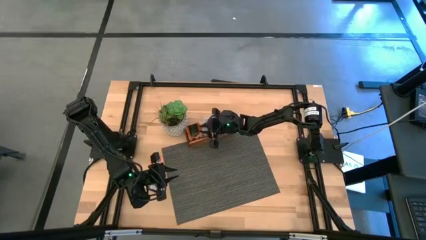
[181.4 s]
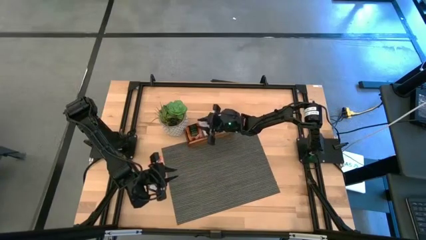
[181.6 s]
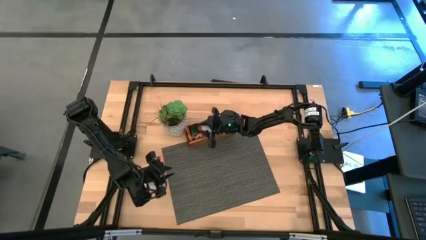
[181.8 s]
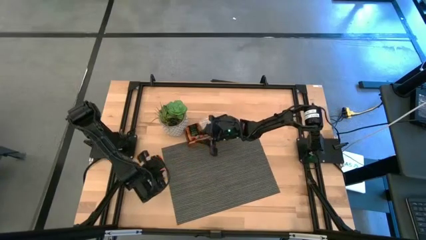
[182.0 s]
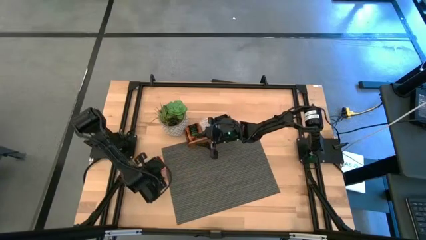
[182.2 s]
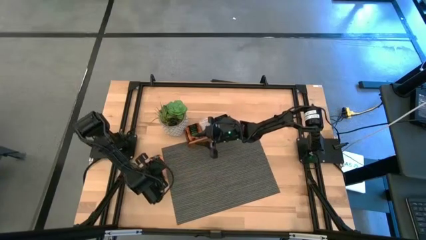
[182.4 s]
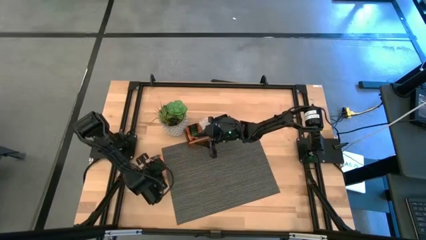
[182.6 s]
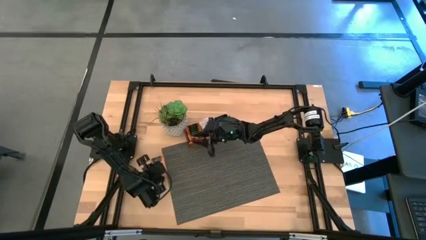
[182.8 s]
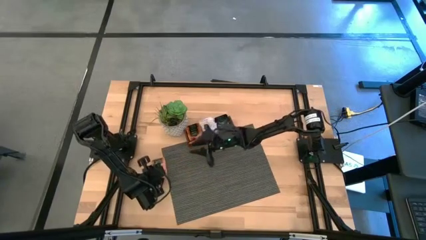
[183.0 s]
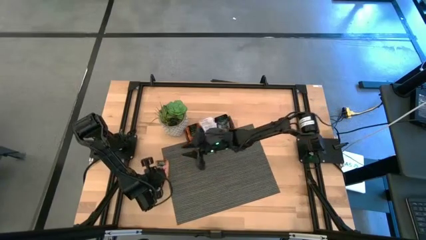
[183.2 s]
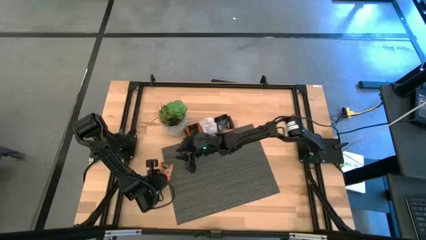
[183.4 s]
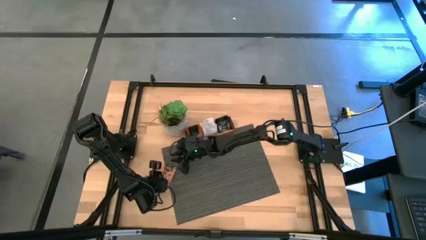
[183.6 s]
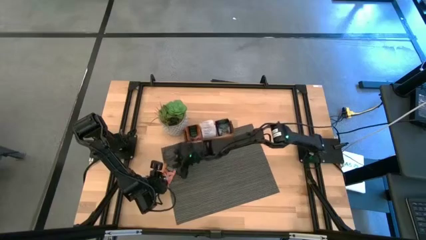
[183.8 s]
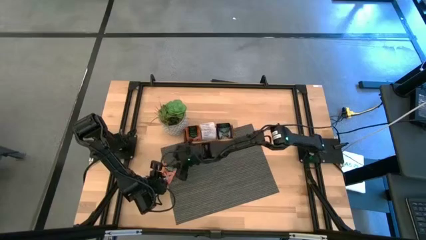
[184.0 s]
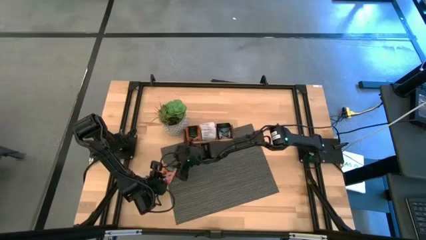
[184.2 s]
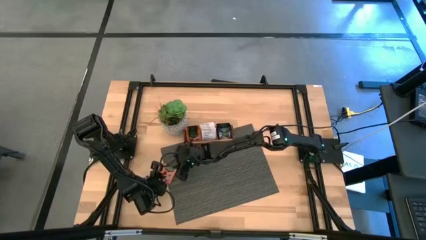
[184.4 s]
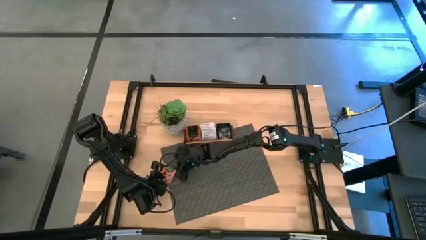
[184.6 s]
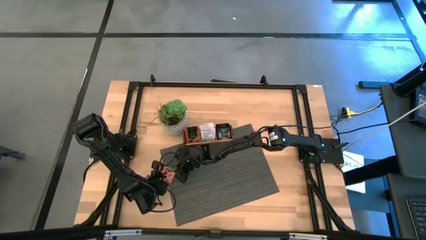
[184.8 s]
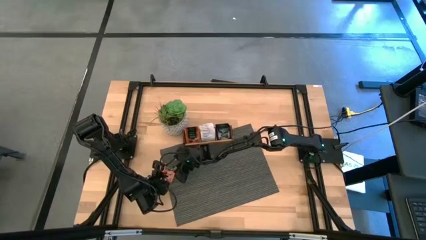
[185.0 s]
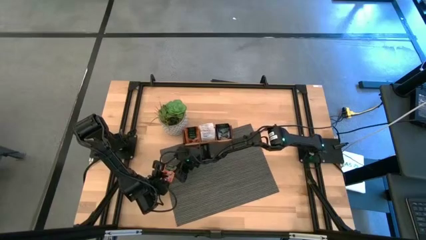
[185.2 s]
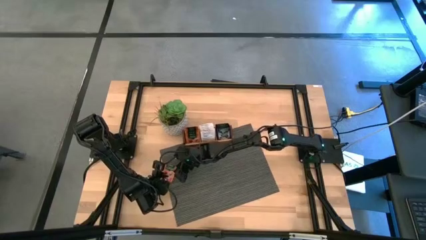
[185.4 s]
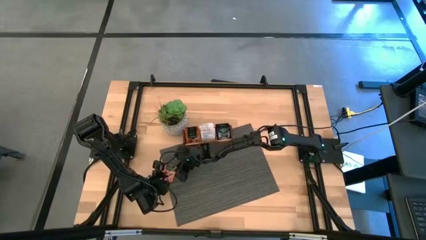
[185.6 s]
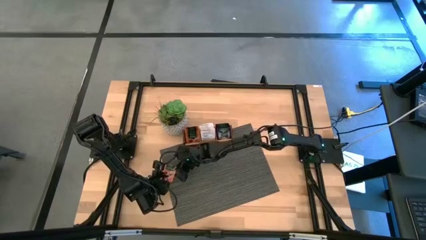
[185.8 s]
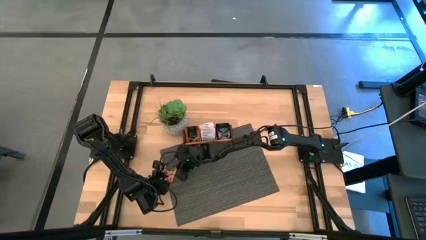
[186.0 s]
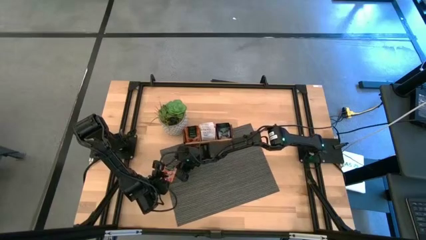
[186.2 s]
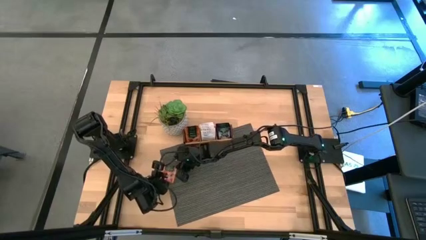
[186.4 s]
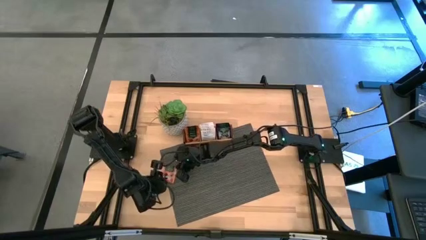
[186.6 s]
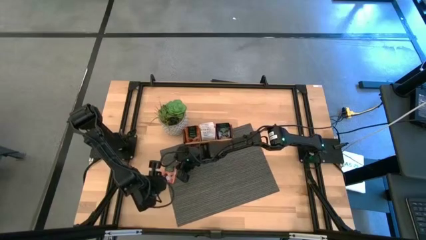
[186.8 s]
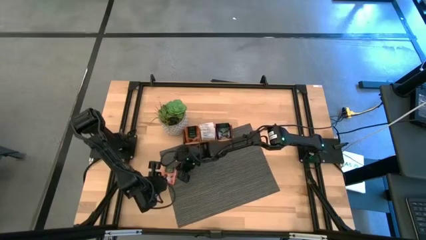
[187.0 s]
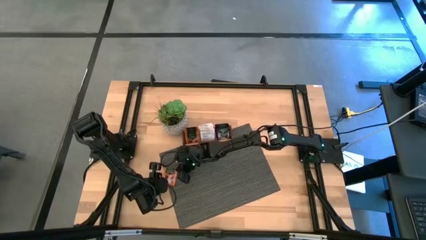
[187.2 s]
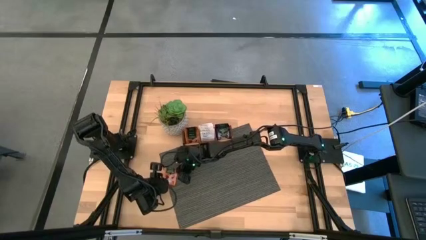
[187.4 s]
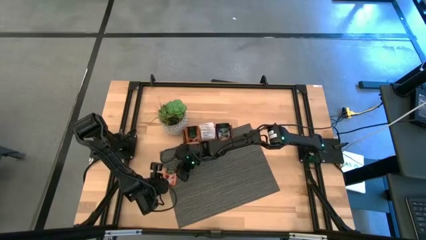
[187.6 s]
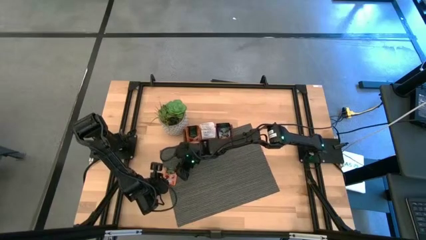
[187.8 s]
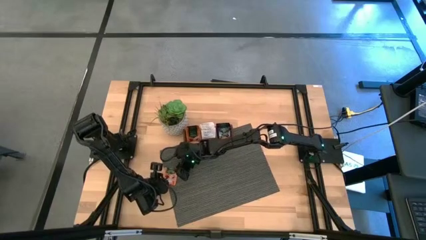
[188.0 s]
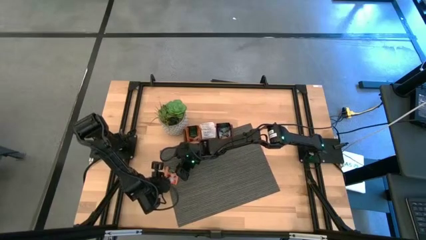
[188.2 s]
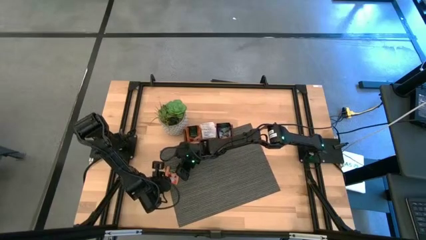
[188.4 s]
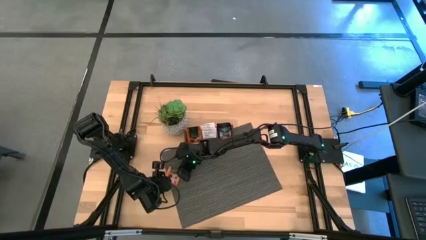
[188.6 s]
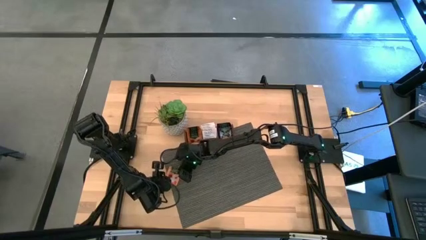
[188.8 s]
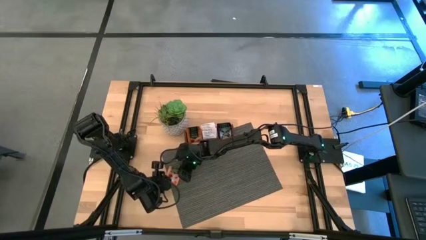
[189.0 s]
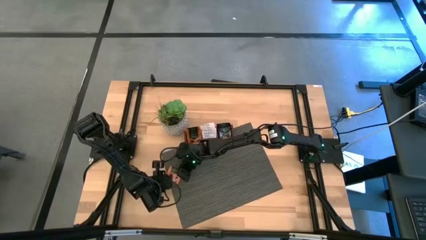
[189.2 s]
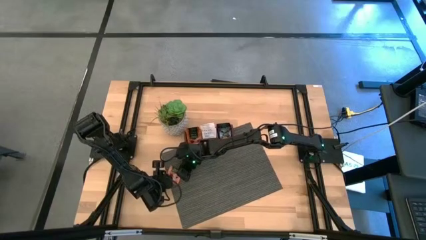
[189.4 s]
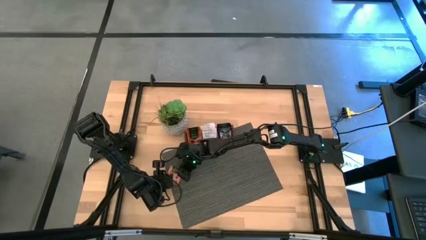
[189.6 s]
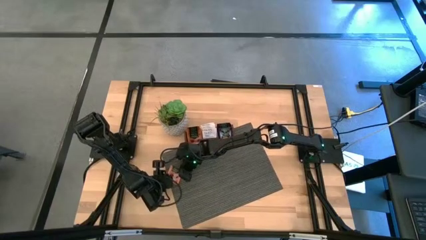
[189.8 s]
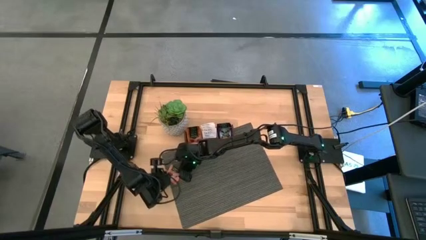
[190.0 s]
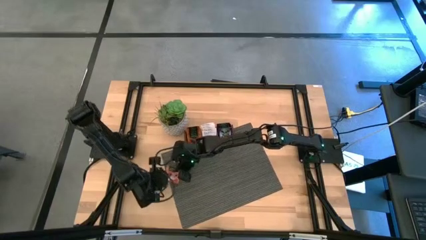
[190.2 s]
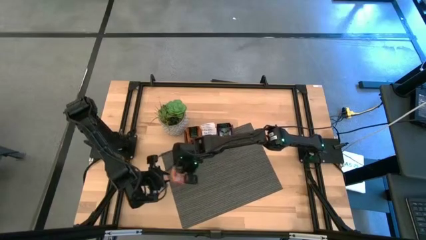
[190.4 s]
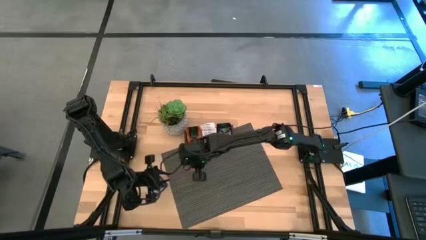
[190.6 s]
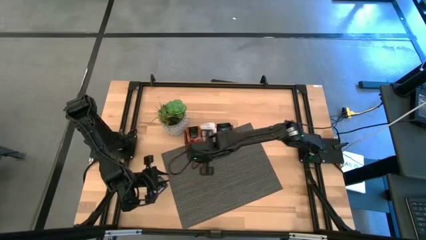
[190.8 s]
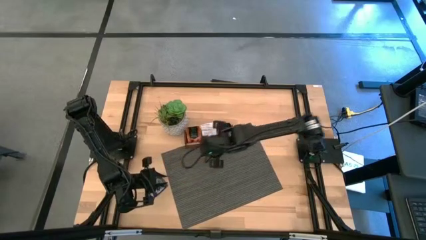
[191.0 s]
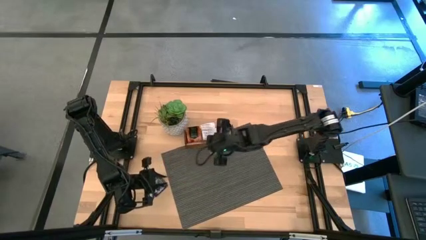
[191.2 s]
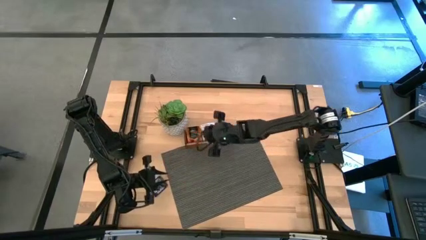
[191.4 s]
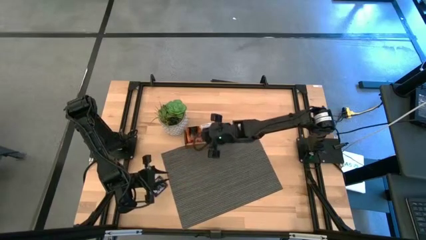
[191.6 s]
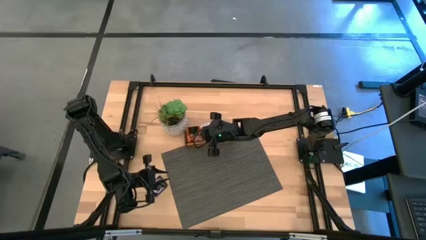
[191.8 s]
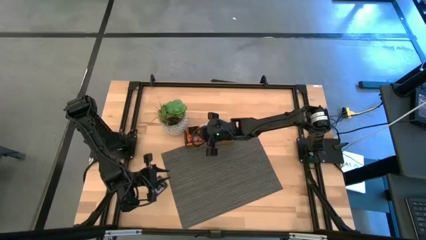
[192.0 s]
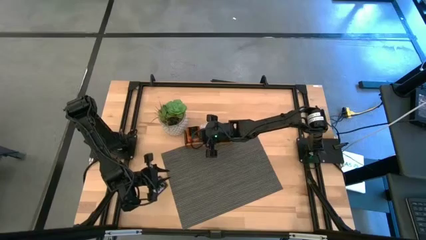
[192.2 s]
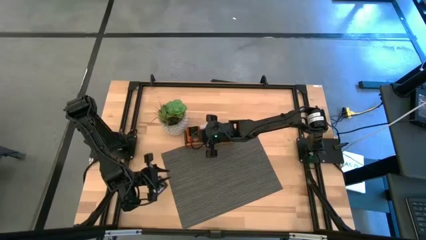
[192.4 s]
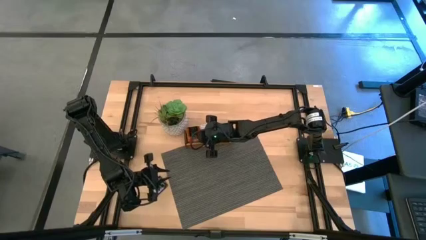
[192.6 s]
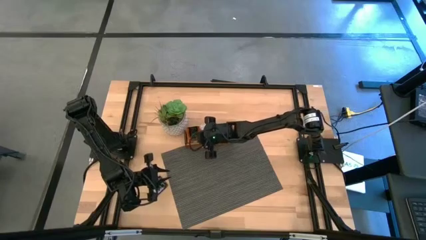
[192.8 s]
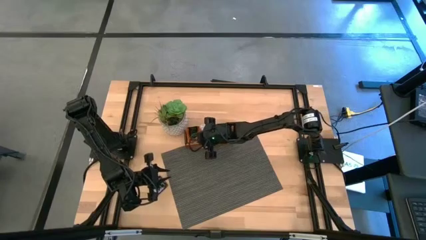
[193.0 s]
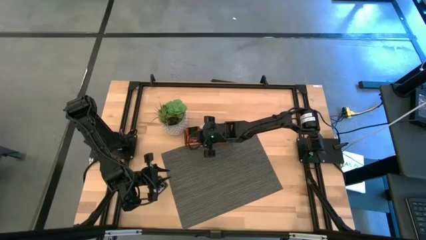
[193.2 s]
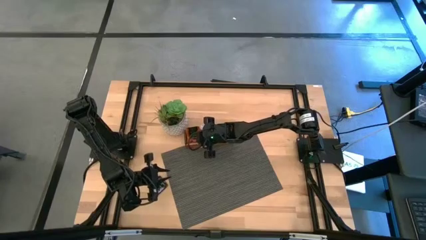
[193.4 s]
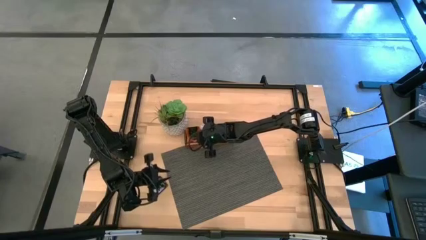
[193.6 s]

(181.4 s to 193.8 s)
Task: Pick & Place Tea
Put the orange tea bag into the left slot of the wooden organizer

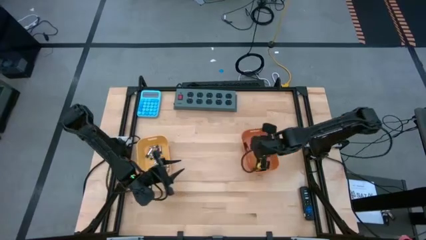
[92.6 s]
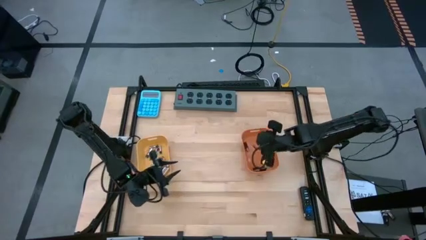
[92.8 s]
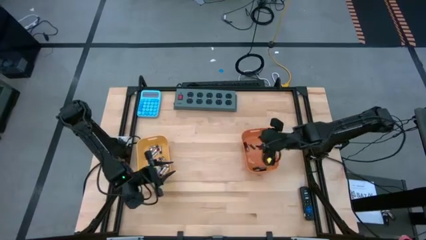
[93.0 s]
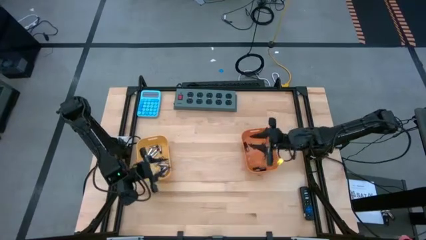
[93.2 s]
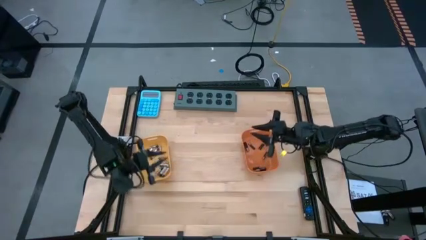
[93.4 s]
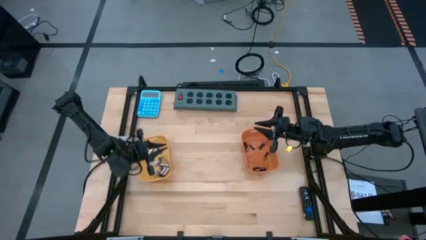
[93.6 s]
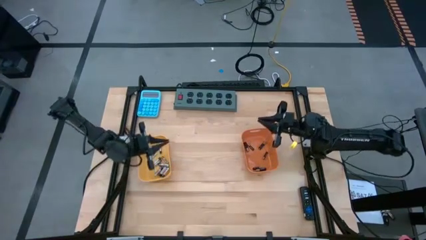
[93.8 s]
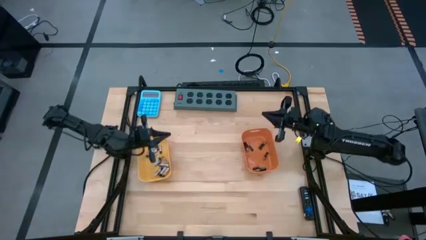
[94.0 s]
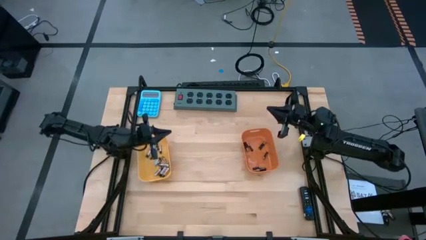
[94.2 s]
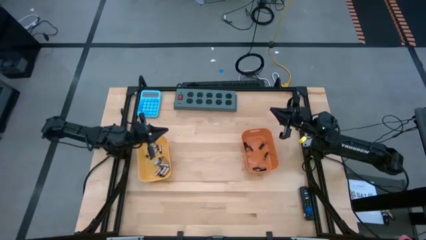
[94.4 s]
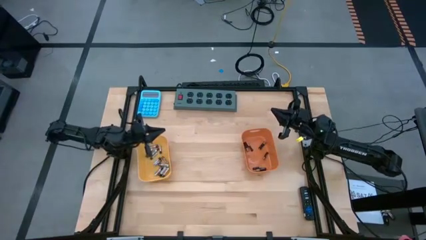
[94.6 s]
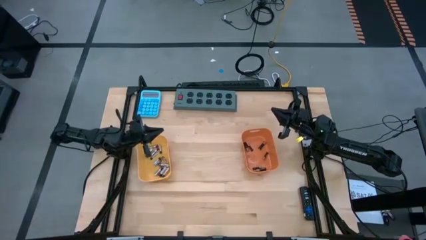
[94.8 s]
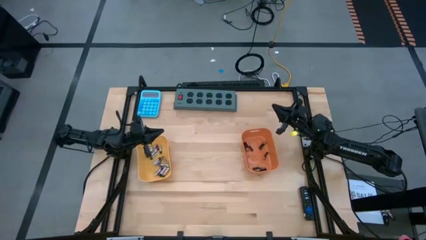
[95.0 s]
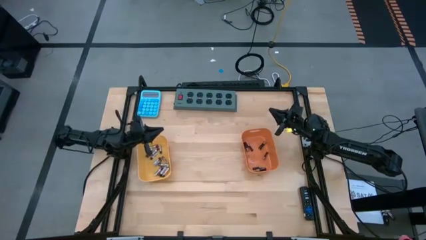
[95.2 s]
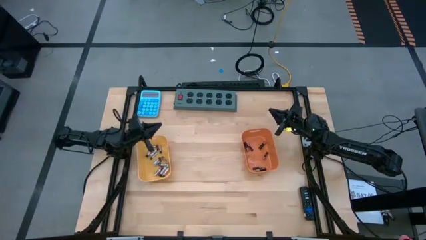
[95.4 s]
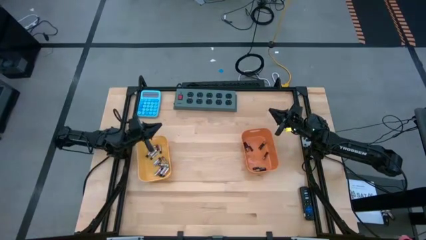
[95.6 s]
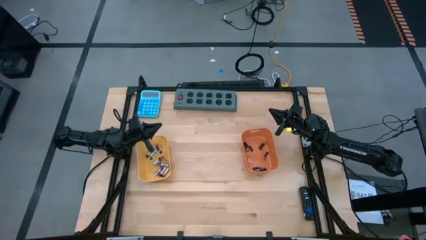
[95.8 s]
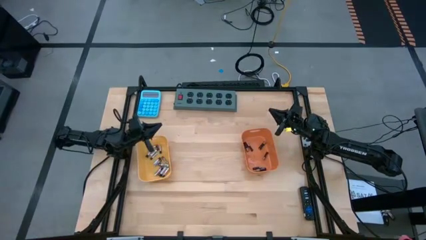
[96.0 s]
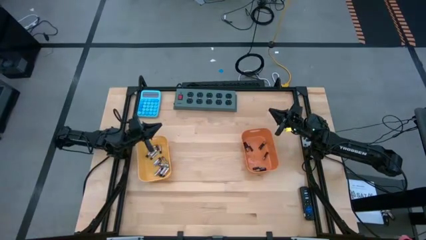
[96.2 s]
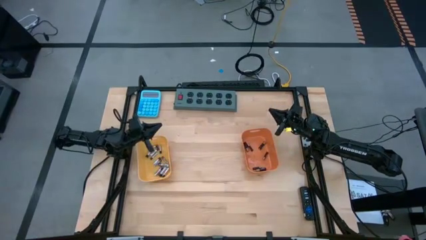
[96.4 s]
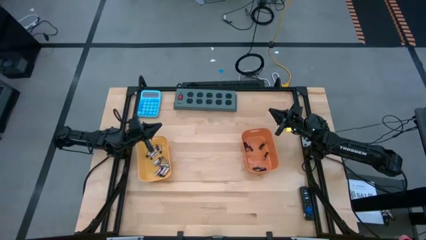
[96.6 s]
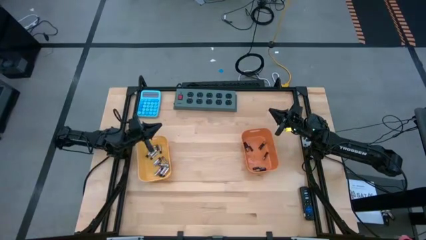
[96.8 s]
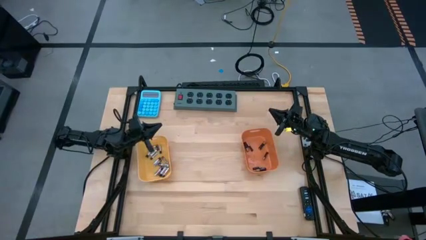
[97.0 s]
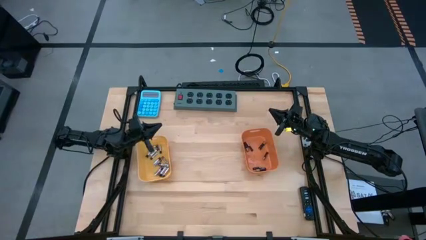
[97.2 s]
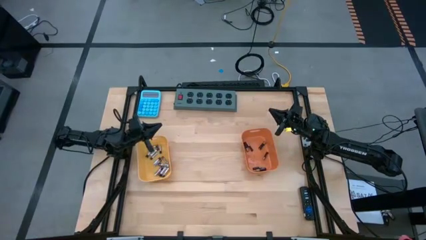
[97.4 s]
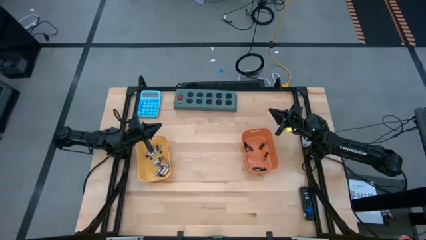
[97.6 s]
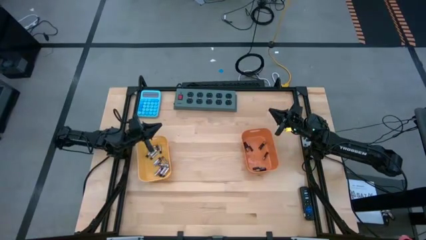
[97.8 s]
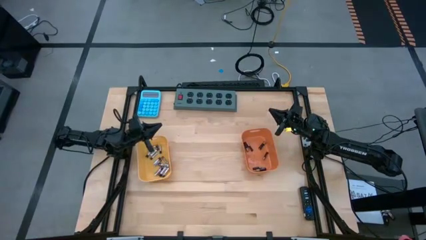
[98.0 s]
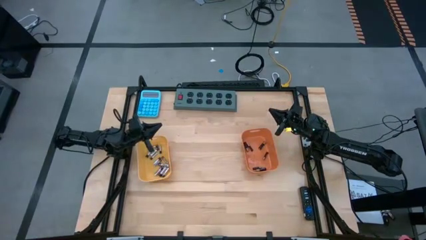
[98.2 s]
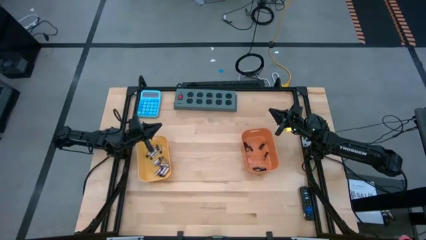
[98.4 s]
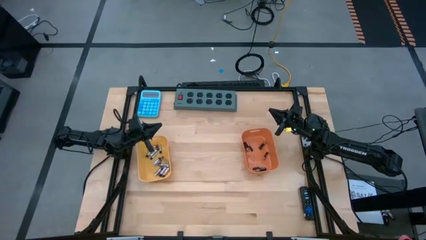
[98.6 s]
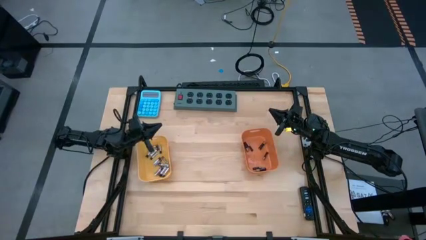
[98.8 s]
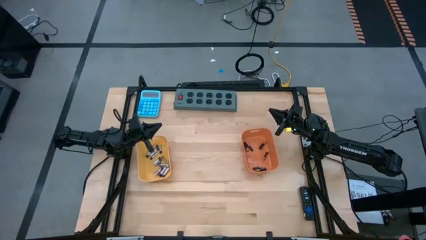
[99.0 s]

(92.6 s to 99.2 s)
Task: Sort batteries
Return to Home Position
